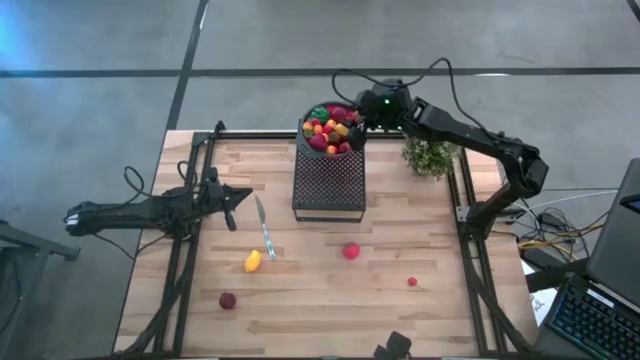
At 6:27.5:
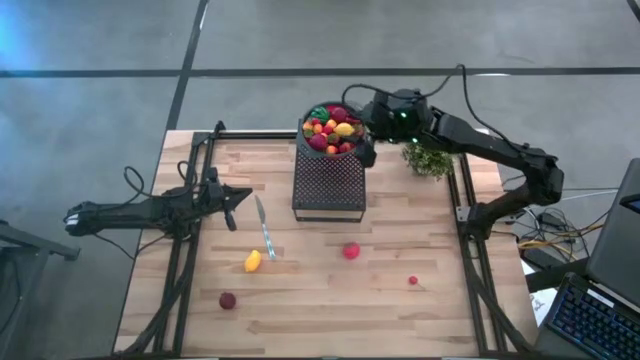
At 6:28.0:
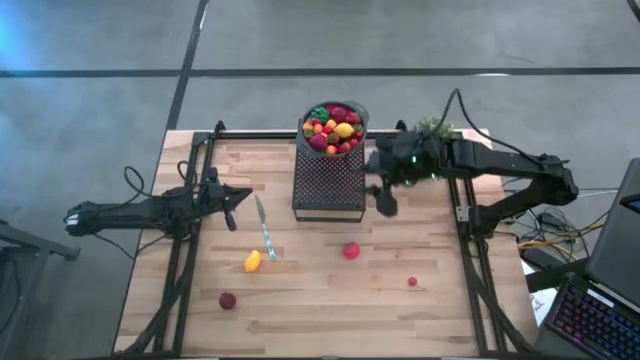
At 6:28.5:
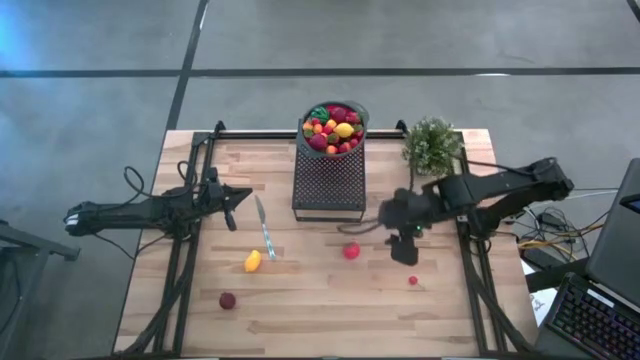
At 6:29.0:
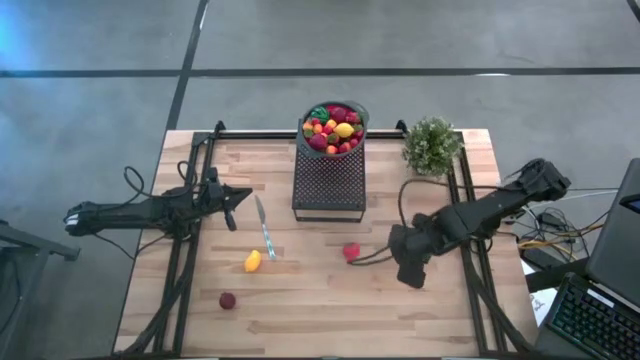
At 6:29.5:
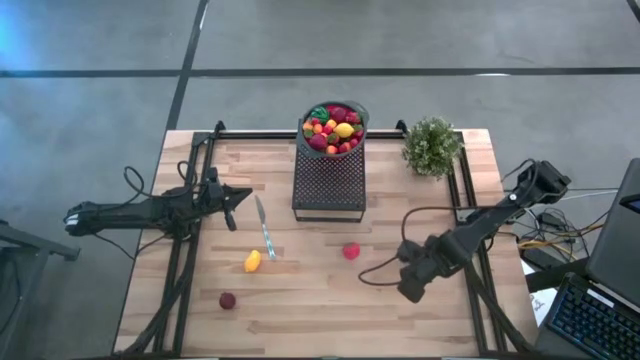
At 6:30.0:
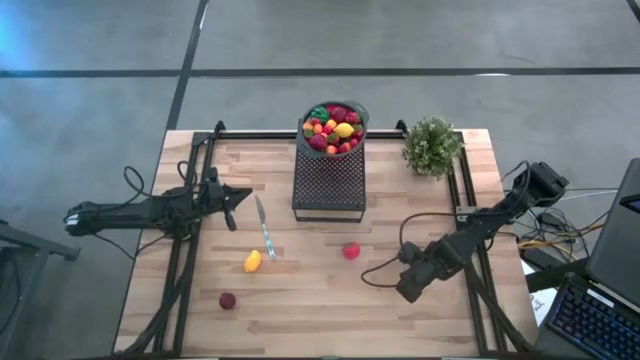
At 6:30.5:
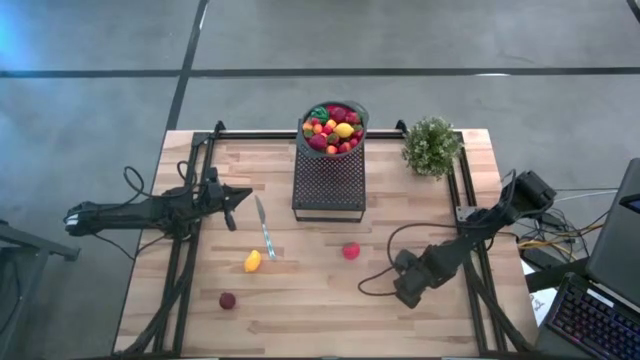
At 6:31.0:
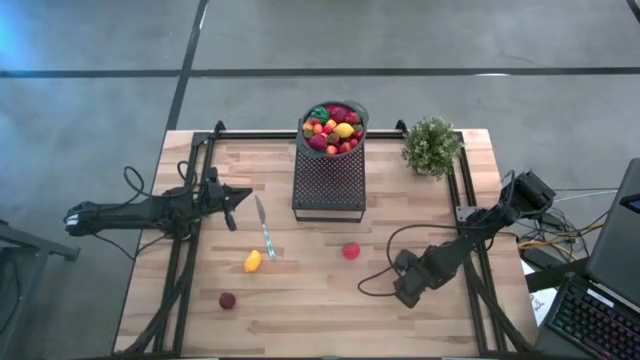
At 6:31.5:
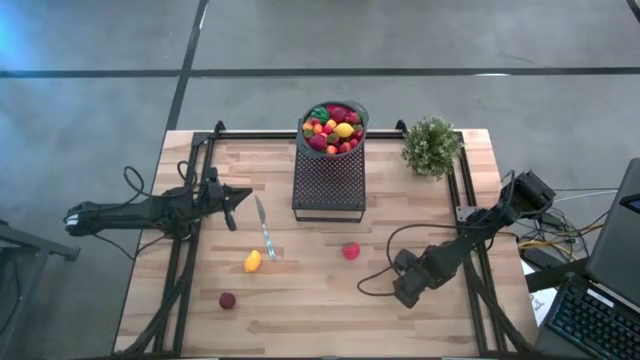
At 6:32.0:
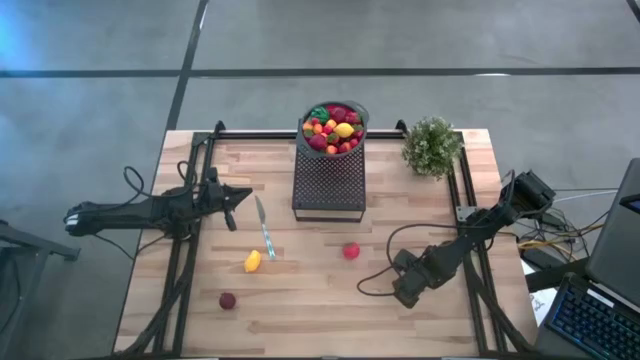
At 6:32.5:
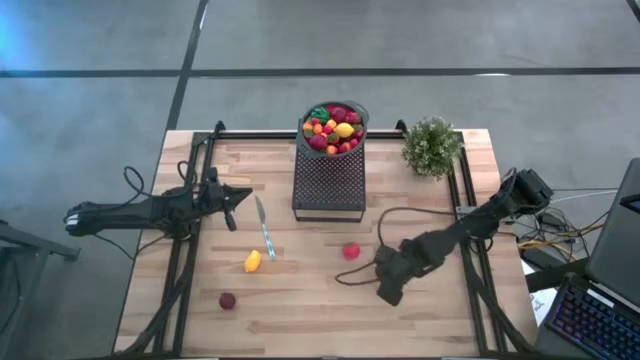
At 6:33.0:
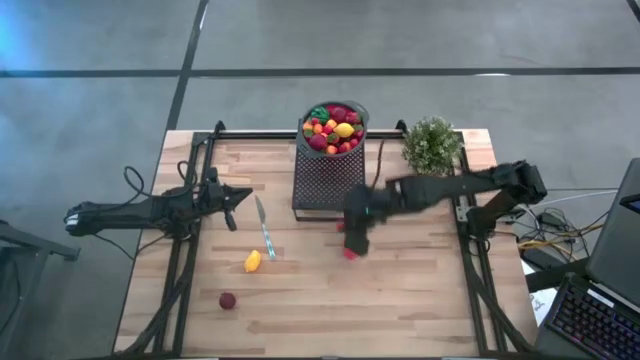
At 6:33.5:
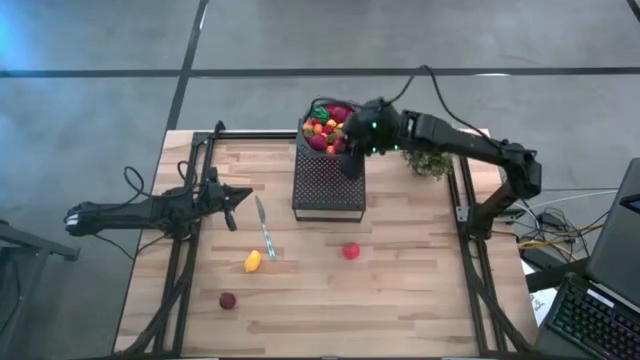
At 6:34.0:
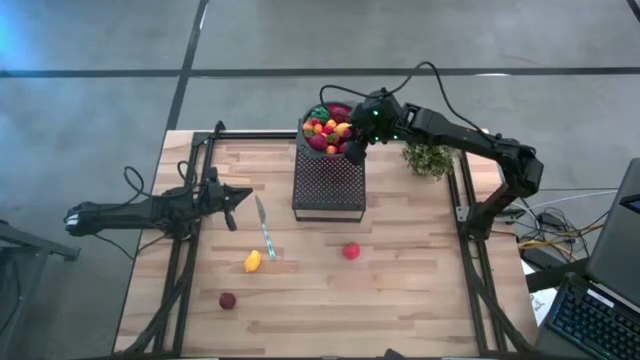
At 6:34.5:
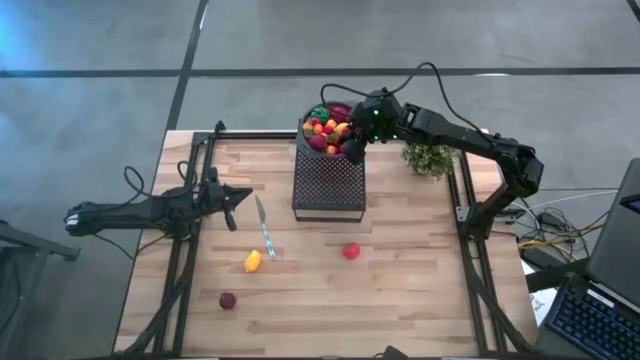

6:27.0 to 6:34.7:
Task: Pick & Place Fruit
Put the red cherry into the strainer bowl on the shelf

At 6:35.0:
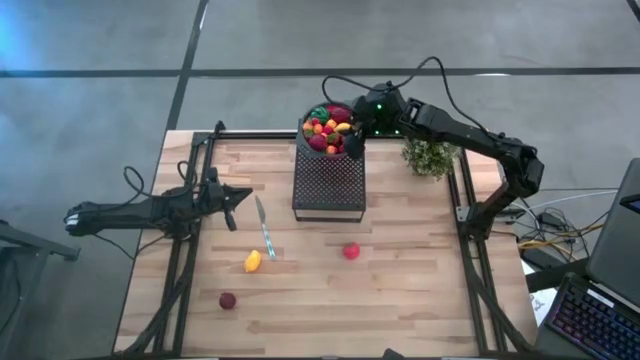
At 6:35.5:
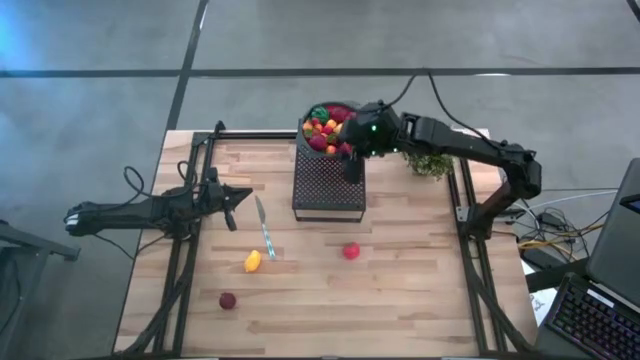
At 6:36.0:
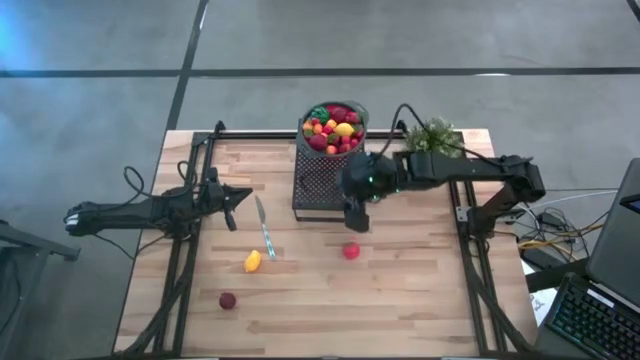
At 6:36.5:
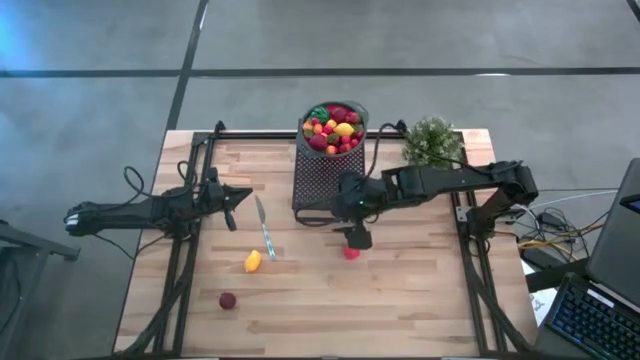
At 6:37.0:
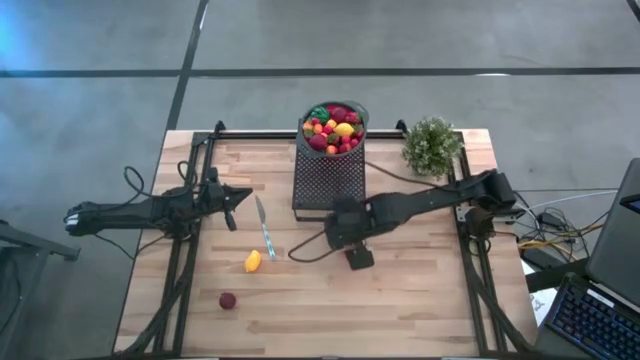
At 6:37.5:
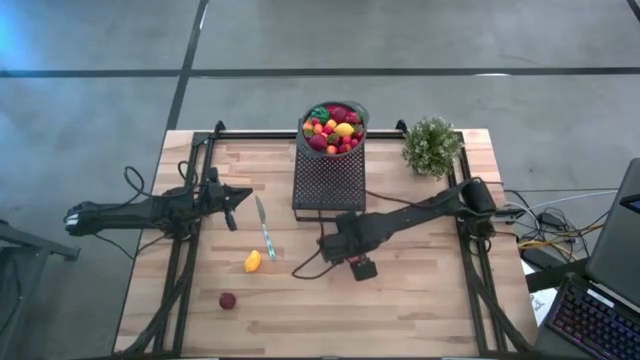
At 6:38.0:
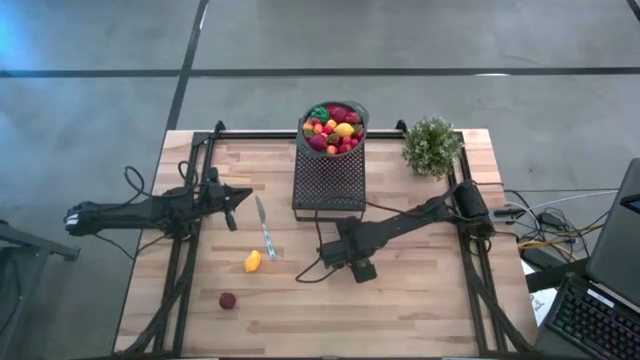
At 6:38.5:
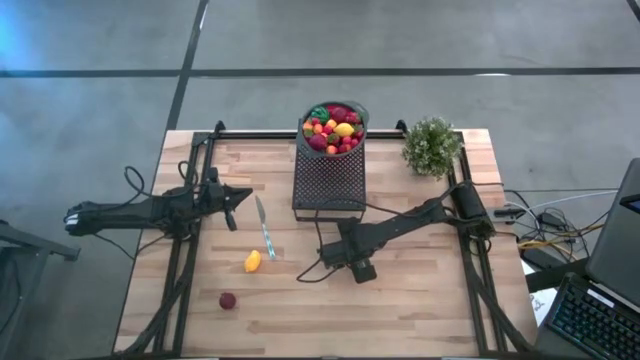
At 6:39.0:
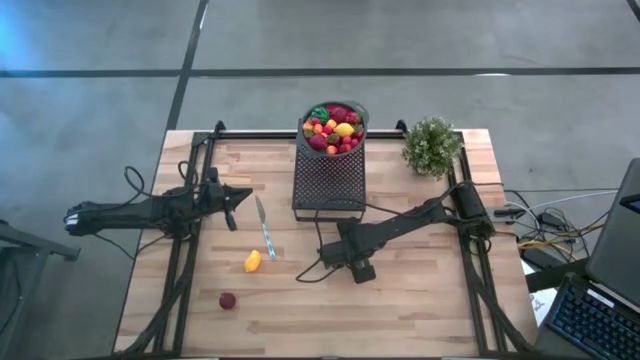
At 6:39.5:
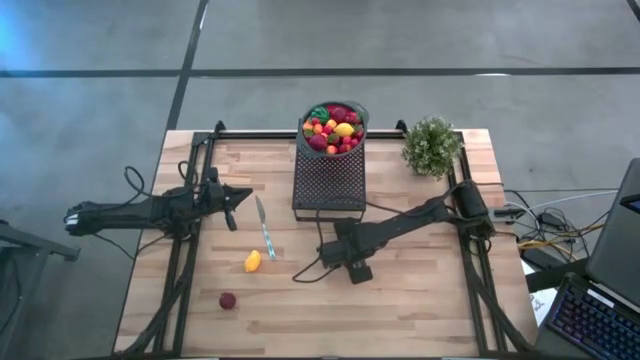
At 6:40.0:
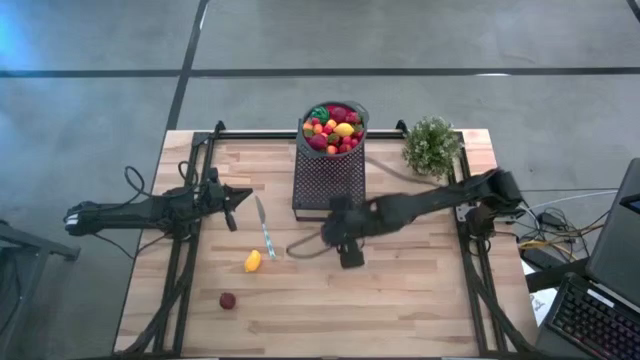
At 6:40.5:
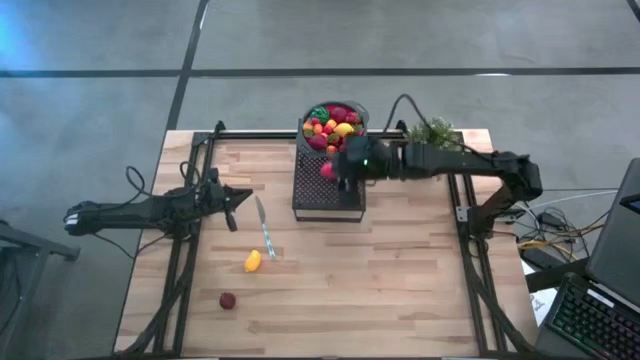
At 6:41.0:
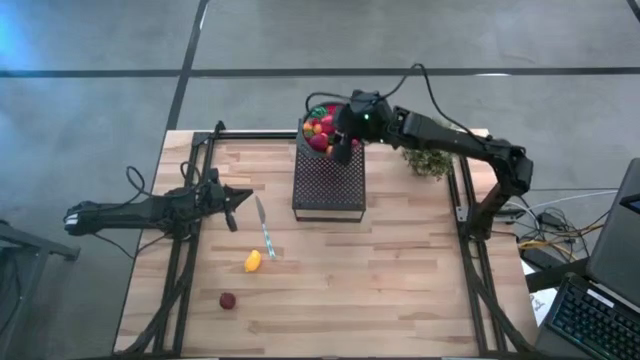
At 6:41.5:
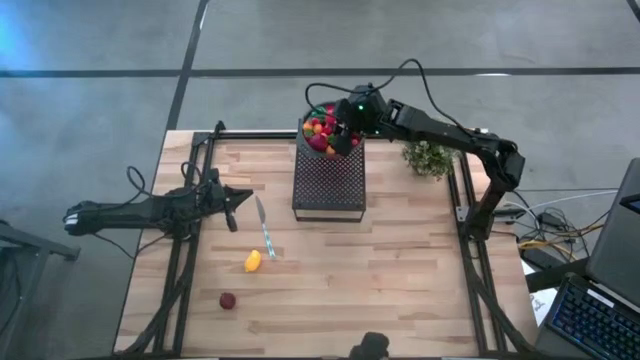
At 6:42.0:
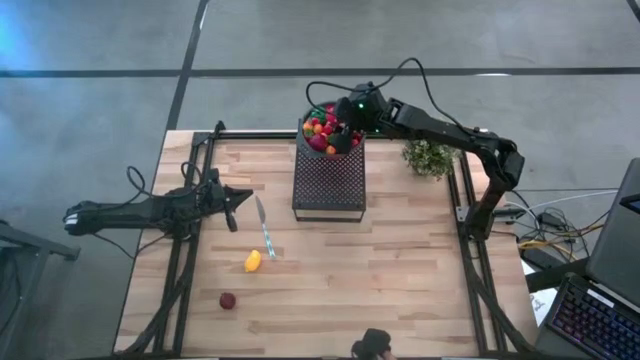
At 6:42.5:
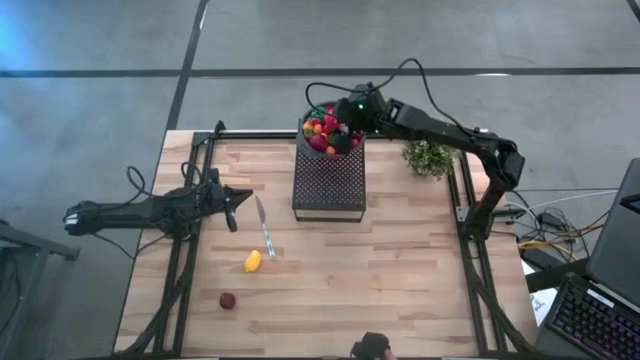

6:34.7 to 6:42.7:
Put the tomato into the strainer bowl on the shelf

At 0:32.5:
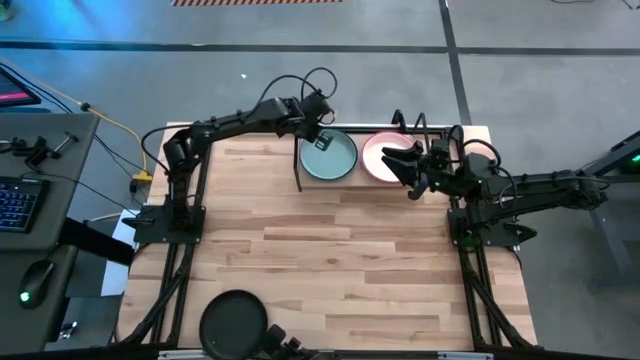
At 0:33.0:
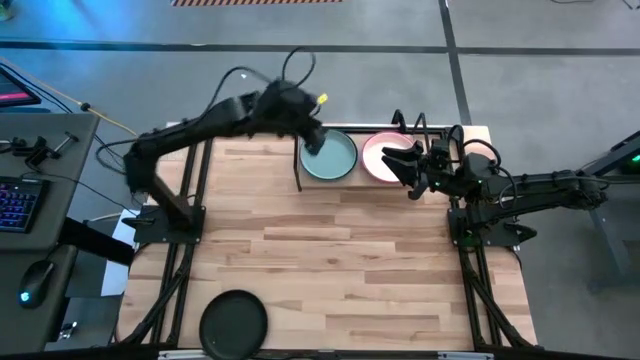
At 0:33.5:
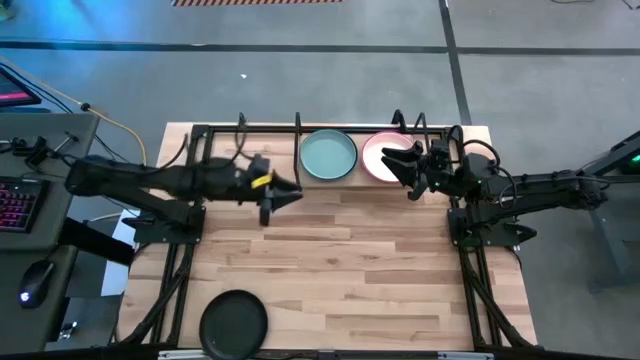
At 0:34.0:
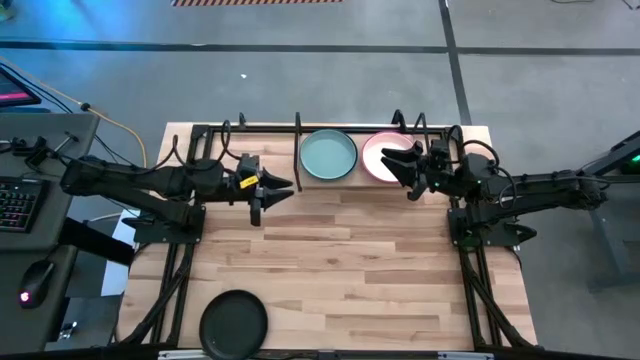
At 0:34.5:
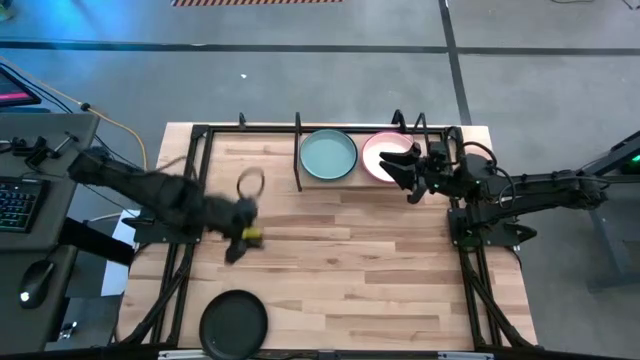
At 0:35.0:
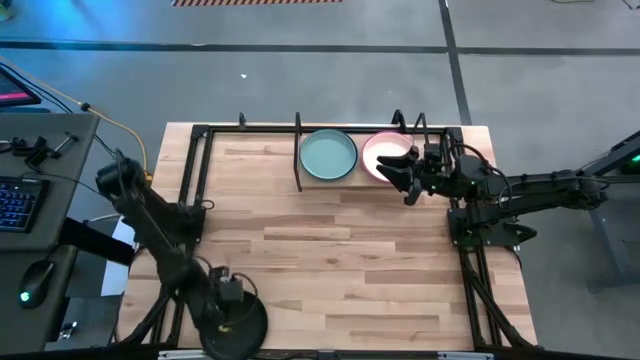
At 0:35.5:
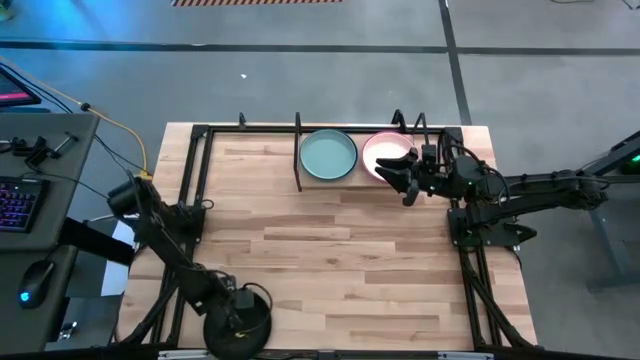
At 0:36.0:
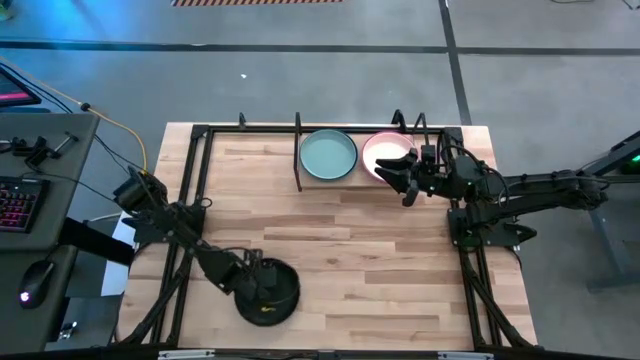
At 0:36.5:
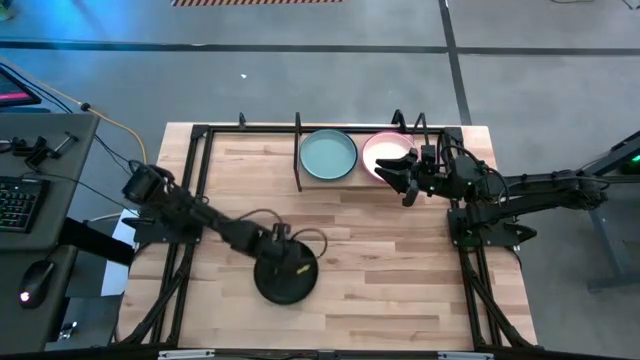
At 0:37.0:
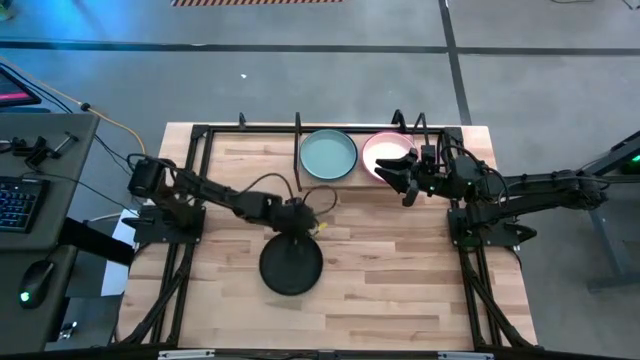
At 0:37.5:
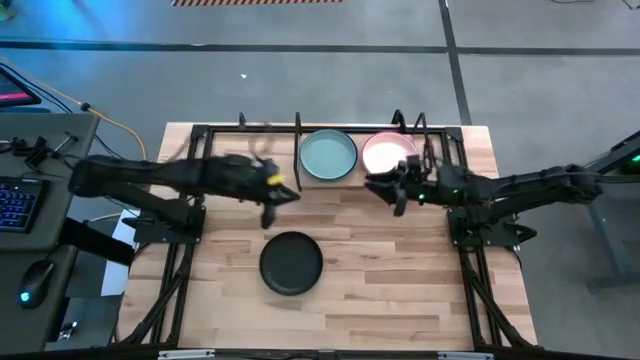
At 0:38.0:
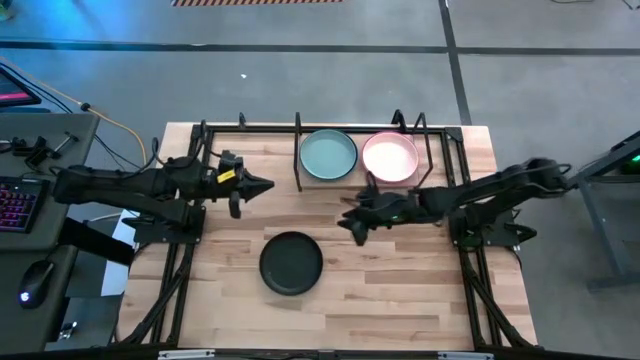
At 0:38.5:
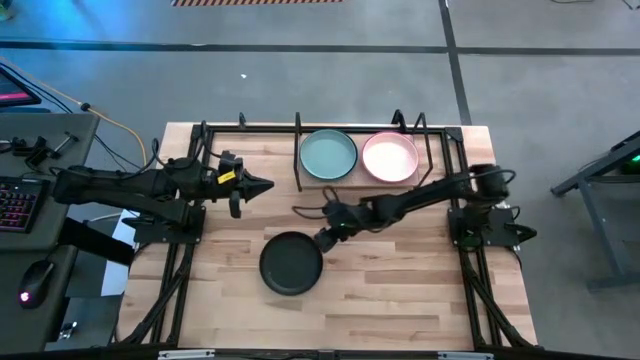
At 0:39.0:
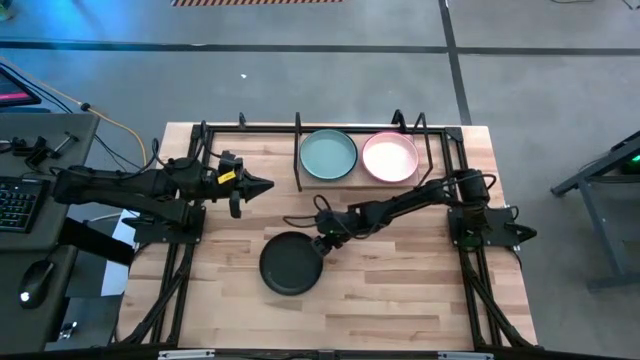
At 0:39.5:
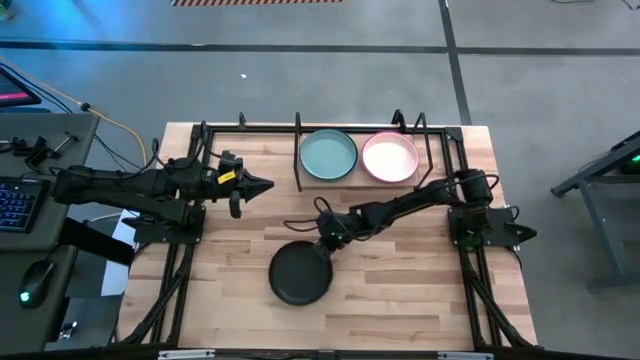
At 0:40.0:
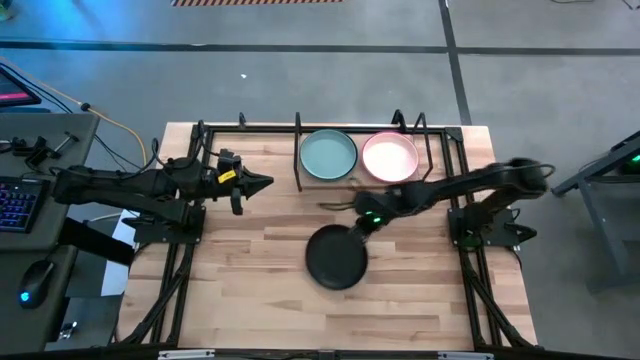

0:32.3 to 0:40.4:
Task: Place and stack plates onto a shelf
Stack the black plate on top of the grey plate
